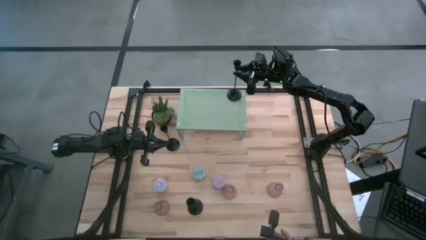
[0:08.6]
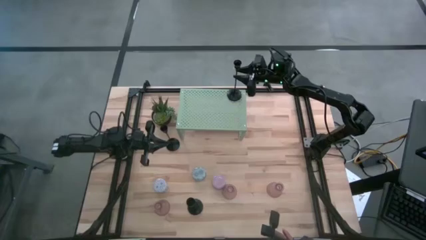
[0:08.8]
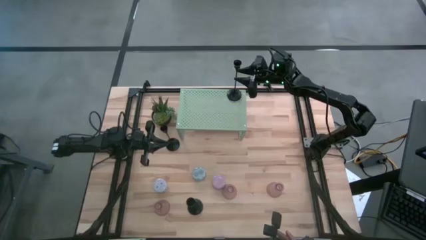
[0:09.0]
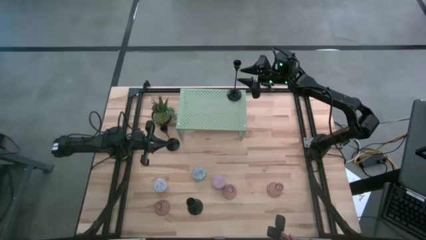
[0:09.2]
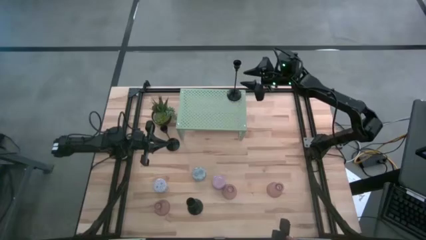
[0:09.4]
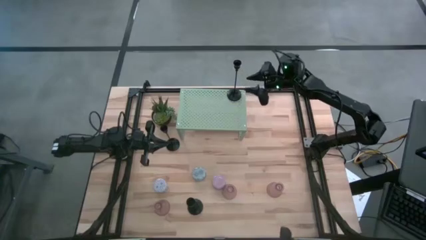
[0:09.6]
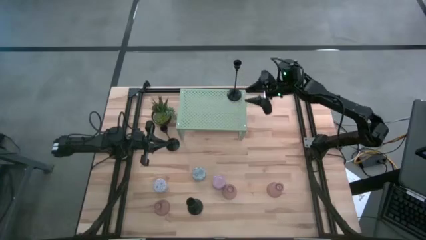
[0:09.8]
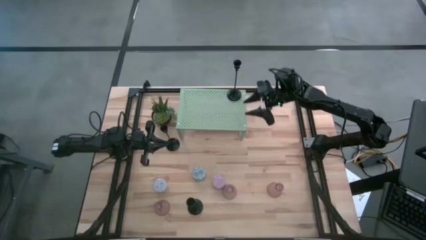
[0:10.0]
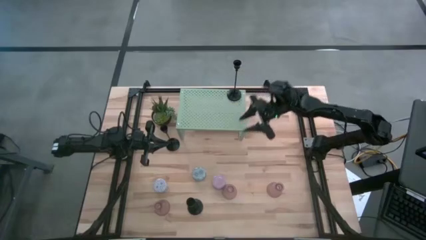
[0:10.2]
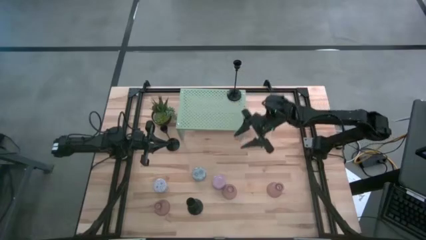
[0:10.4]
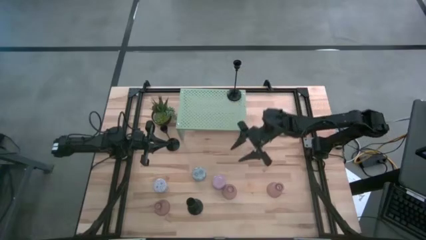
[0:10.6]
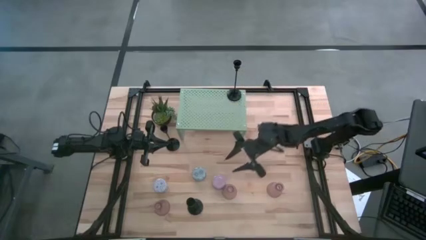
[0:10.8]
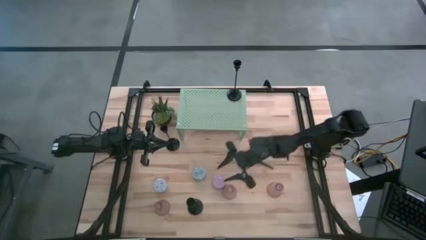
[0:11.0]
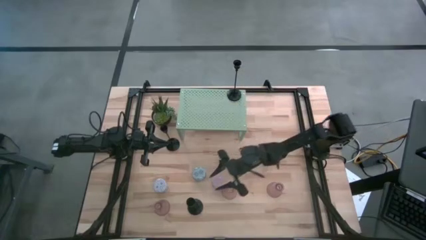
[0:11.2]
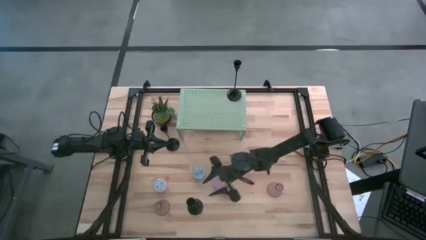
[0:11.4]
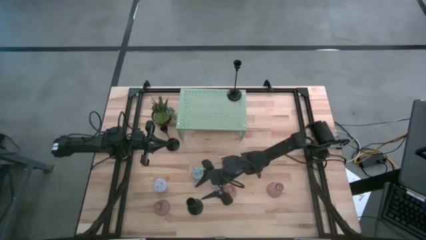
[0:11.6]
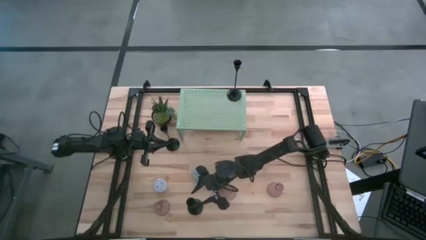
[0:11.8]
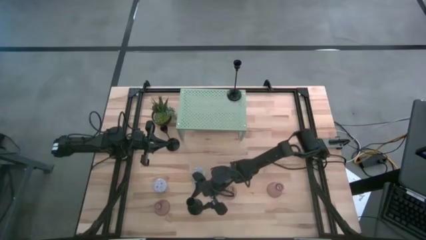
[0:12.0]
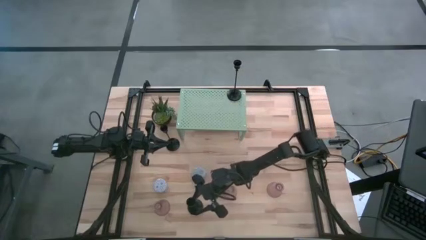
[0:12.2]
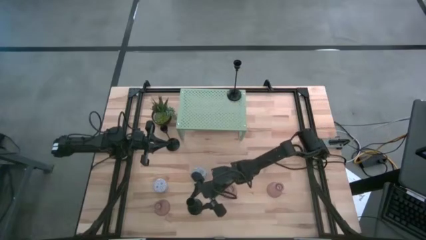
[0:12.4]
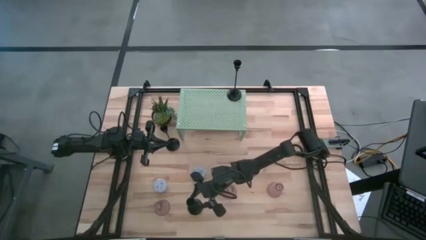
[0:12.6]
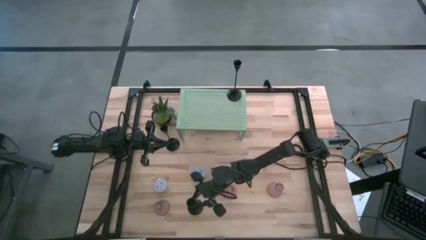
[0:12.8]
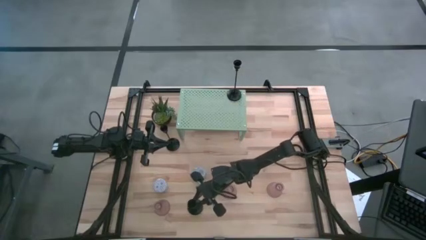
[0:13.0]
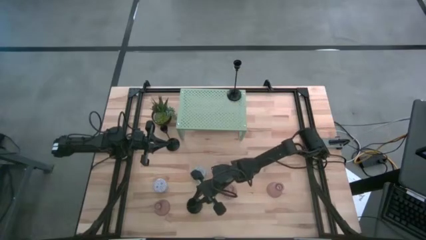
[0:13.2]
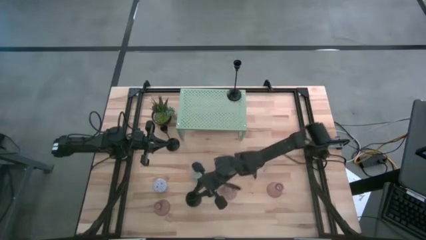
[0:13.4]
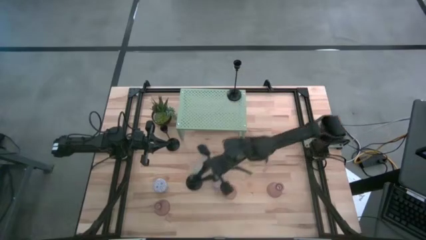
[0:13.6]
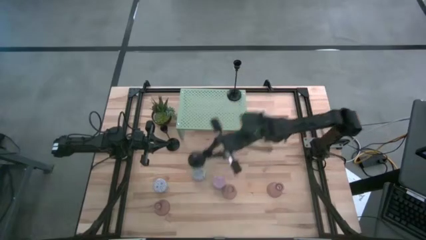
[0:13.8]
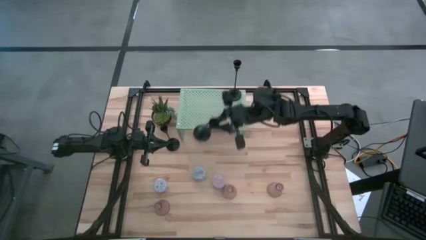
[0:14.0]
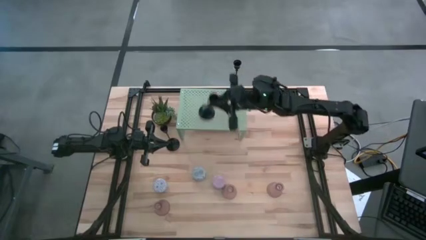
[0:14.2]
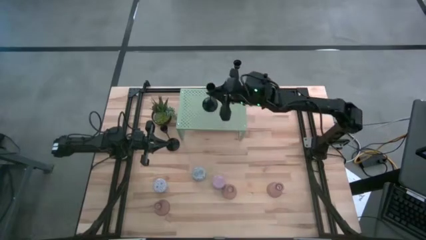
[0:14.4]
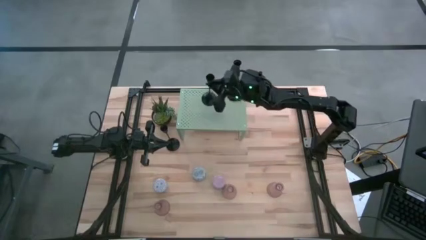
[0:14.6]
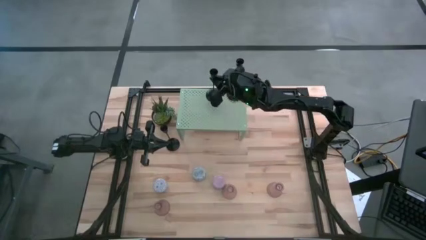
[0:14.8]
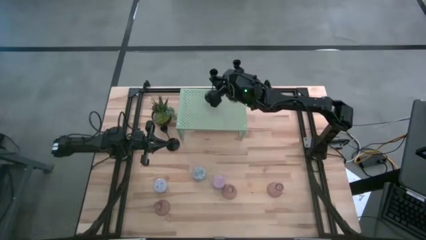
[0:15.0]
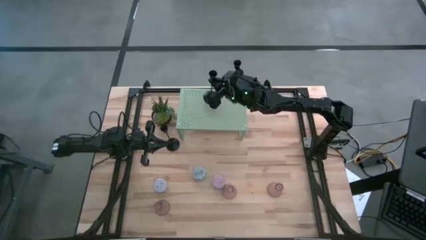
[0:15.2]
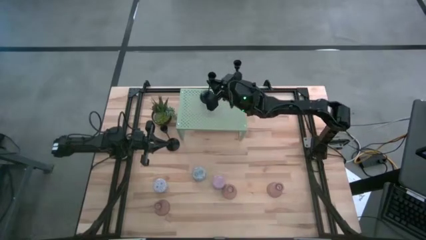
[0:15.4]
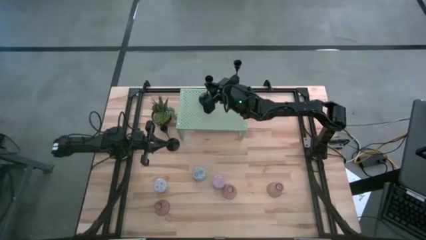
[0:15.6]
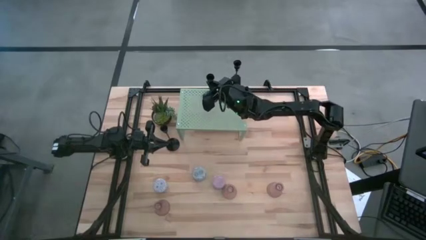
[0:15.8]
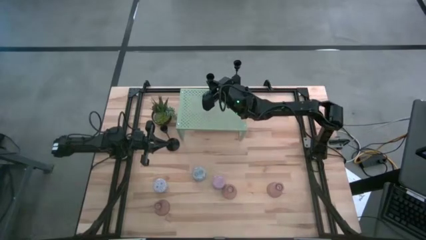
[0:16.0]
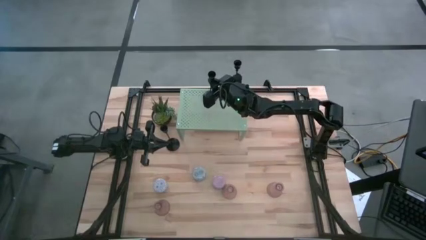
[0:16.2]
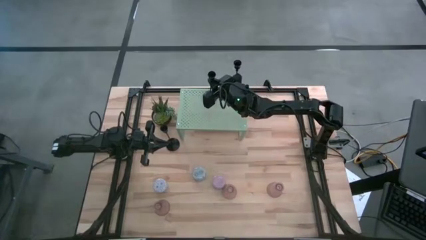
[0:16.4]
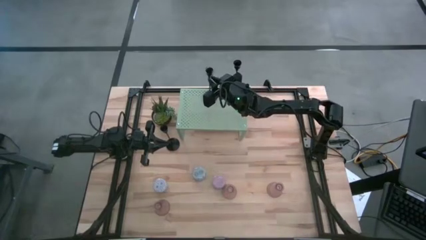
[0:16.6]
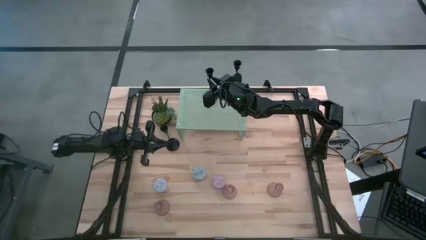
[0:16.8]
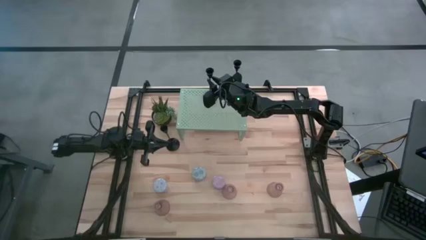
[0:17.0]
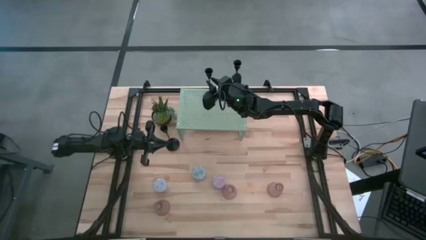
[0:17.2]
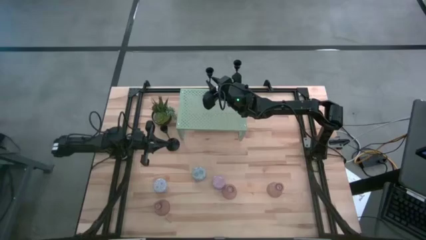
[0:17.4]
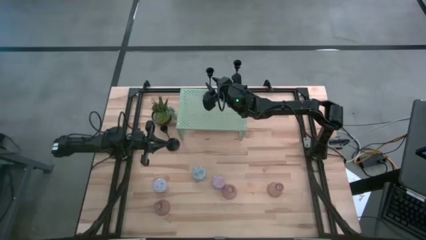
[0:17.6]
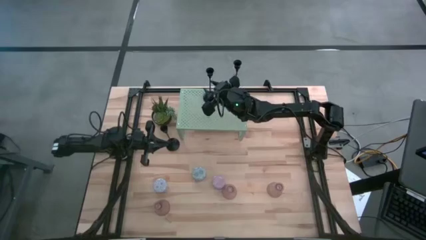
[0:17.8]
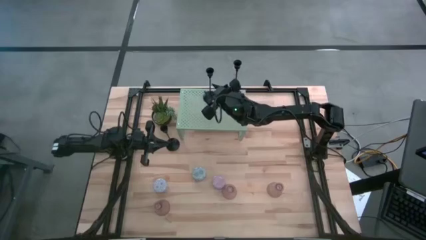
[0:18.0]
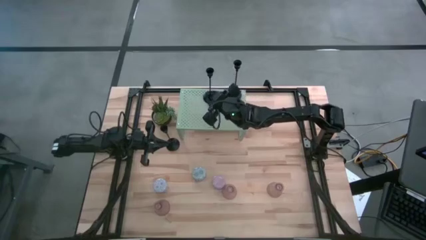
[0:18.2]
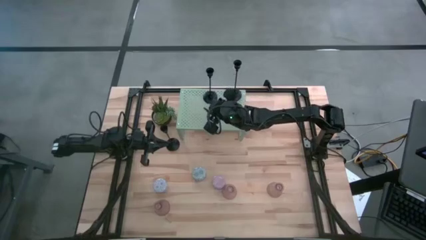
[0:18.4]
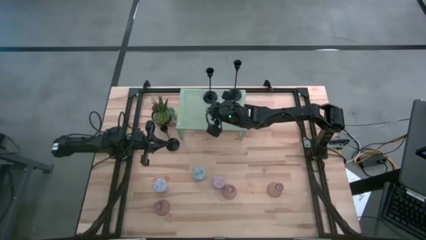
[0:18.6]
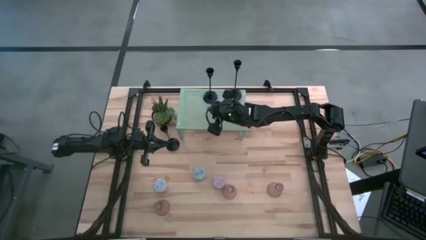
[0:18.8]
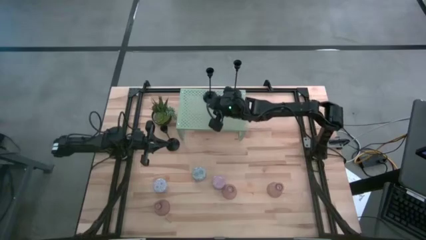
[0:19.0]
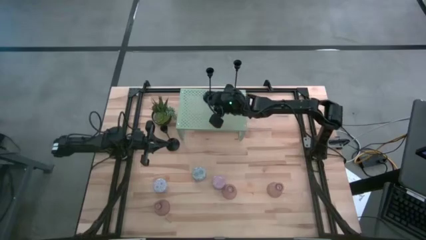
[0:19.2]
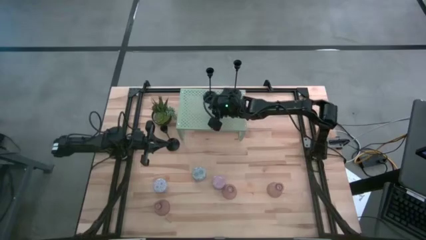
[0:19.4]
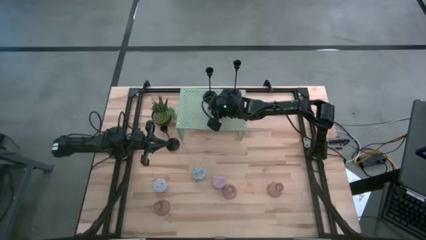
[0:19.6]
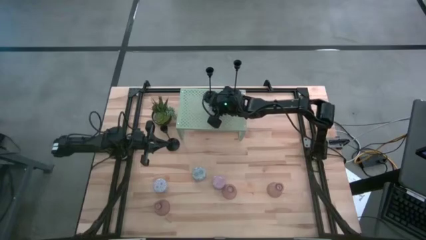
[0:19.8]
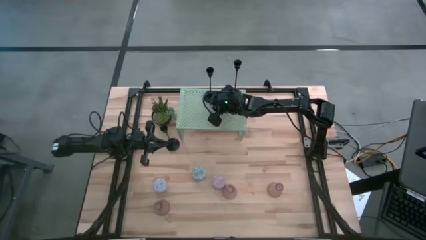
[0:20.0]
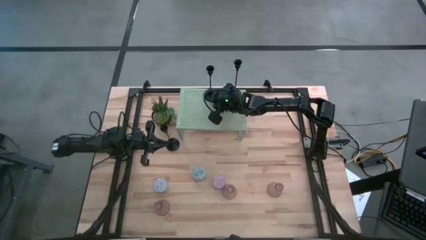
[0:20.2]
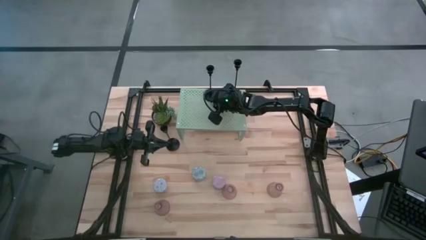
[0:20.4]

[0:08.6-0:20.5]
Task: Pick & Place candle stick holders
Put the bottom black candle holder on the shelf

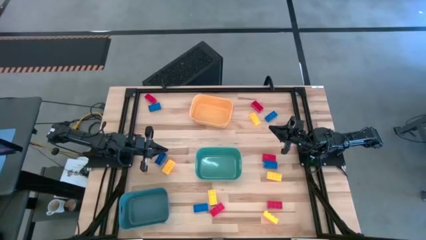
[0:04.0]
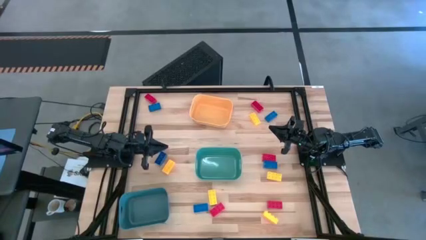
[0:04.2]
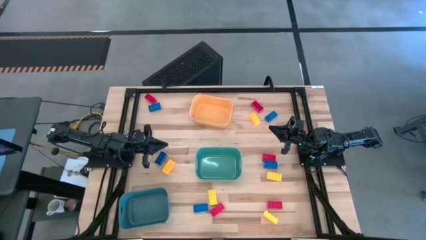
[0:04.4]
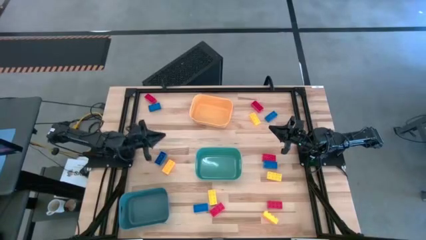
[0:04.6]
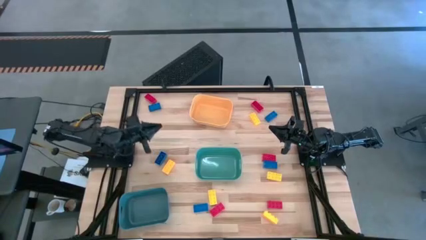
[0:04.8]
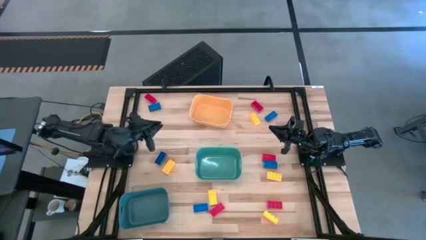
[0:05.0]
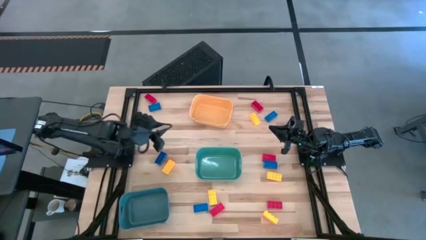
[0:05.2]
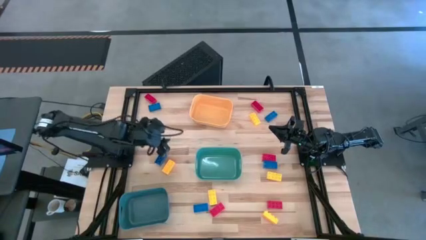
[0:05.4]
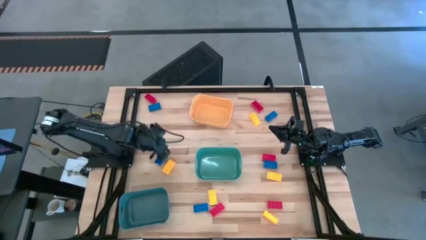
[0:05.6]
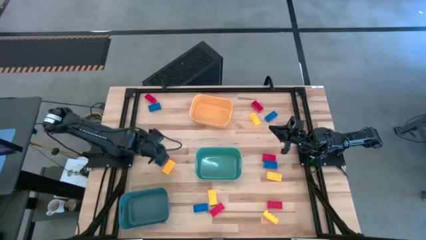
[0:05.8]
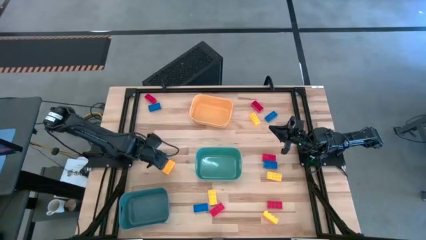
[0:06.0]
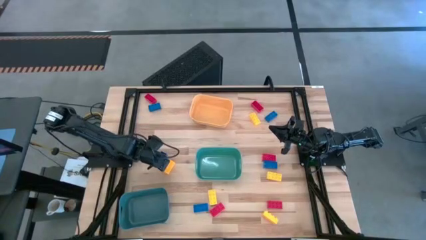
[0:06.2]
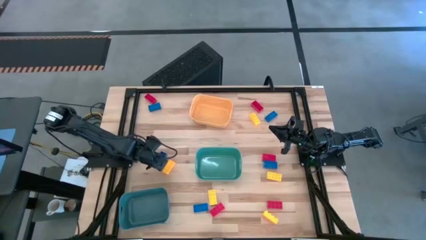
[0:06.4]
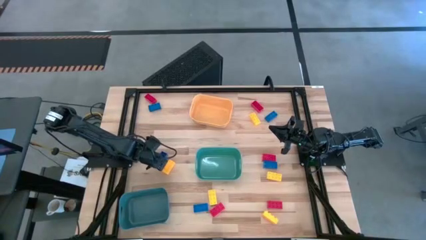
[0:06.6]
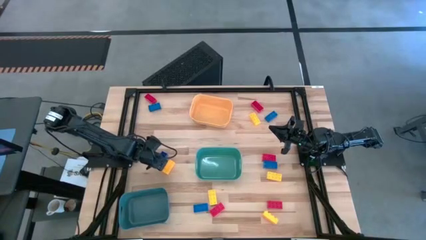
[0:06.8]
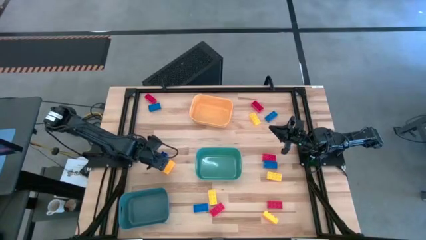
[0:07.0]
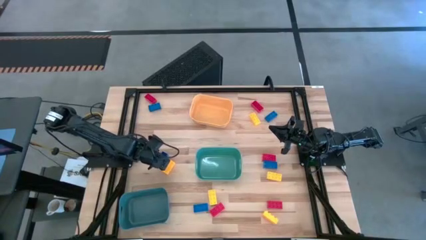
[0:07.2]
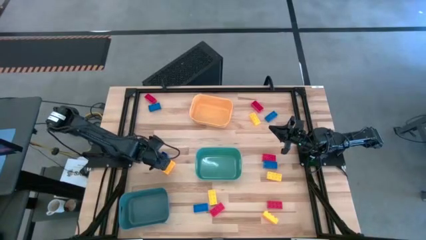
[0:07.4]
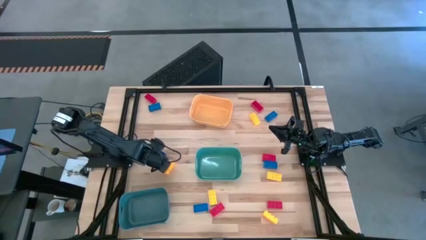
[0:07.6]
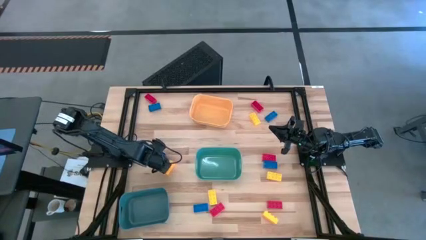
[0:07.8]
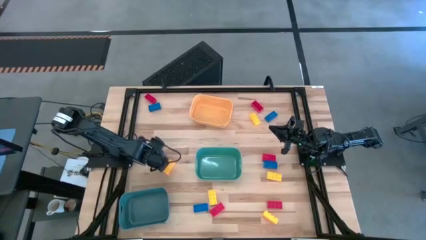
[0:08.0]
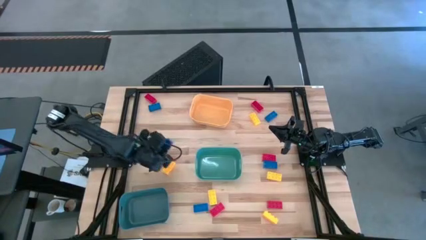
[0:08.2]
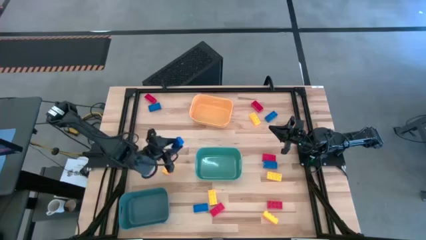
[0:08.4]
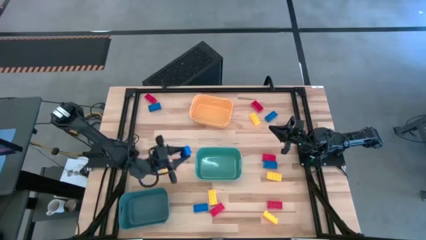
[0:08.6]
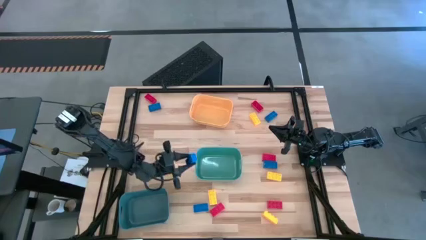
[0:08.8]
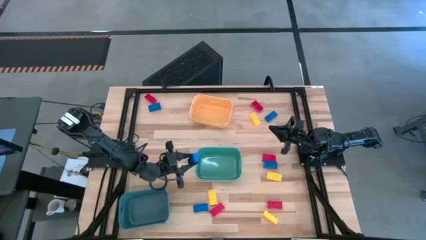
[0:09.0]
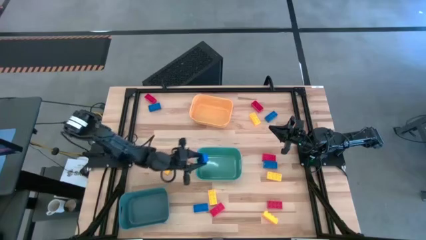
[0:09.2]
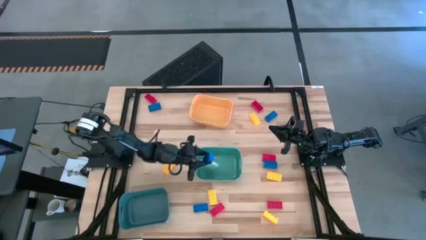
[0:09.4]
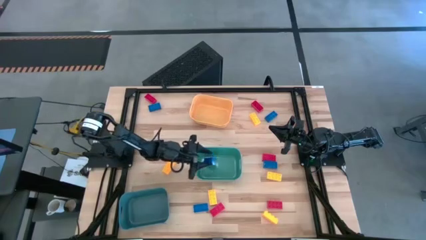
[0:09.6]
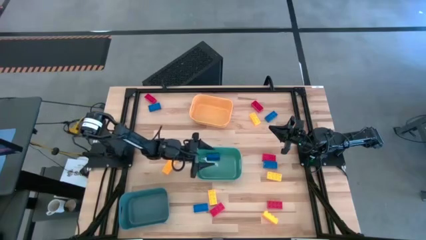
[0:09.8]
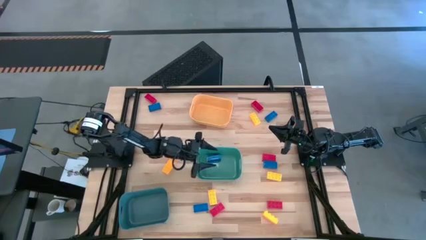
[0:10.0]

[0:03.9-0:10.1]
Task: Sort & place blocks by color
Put the blue game piece into the green bin
